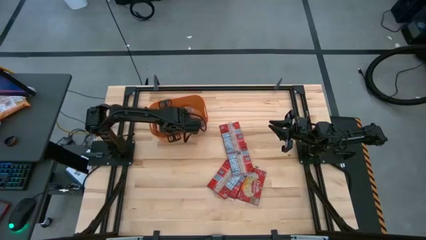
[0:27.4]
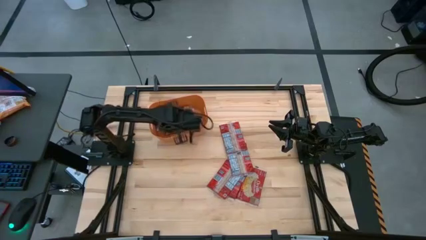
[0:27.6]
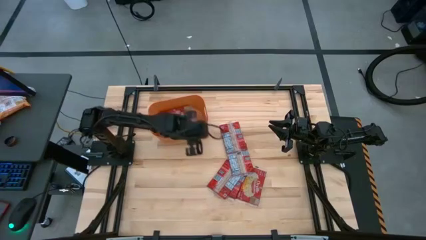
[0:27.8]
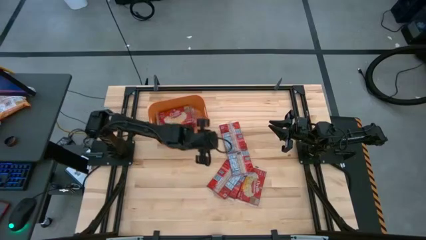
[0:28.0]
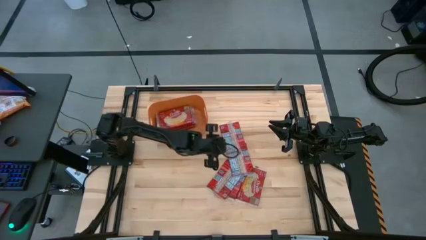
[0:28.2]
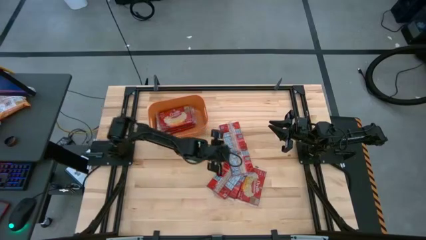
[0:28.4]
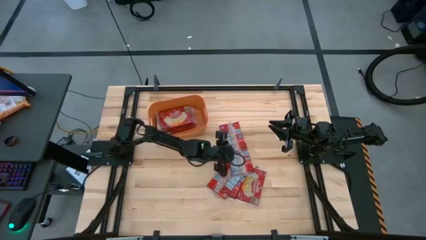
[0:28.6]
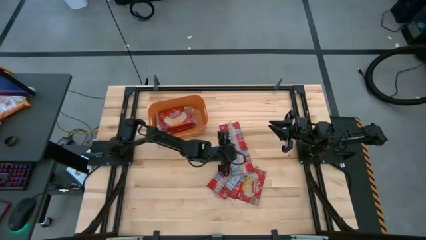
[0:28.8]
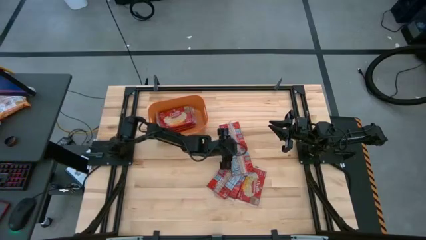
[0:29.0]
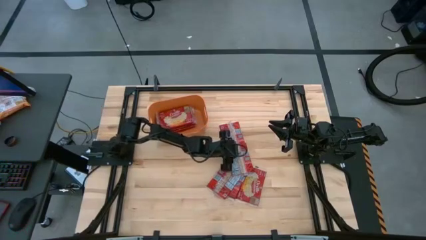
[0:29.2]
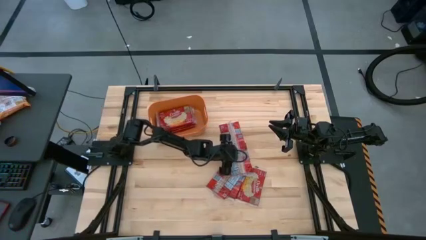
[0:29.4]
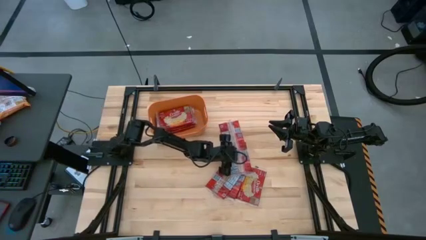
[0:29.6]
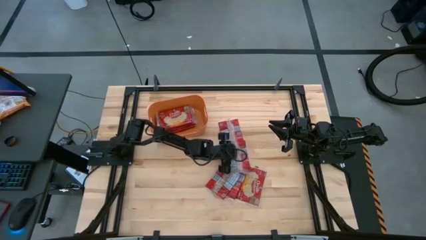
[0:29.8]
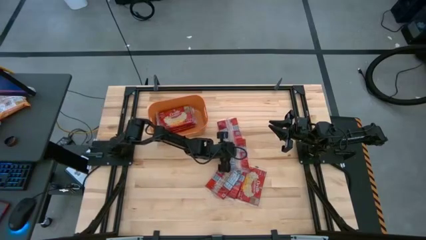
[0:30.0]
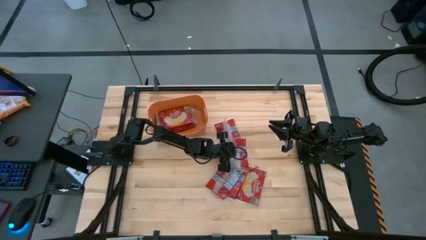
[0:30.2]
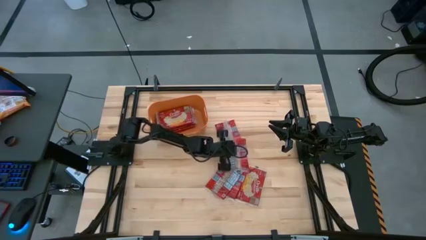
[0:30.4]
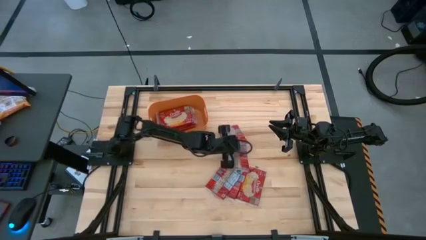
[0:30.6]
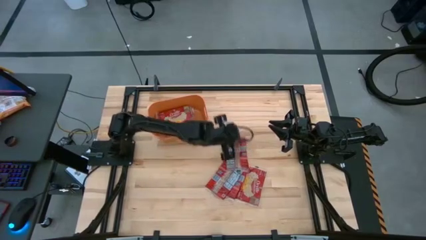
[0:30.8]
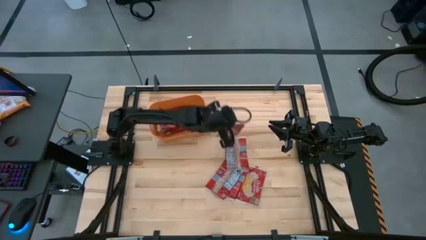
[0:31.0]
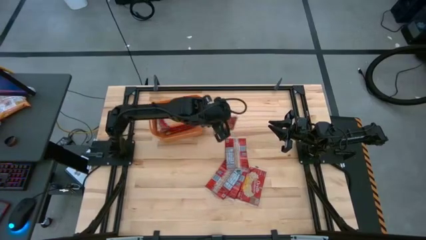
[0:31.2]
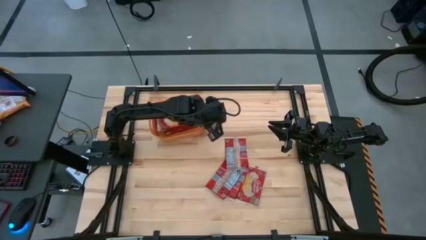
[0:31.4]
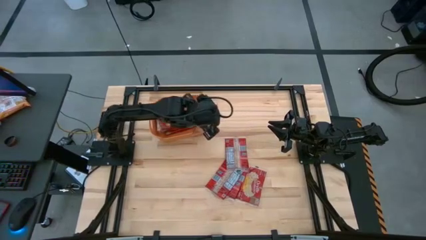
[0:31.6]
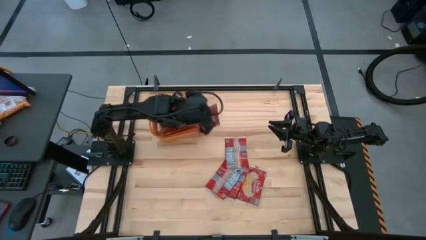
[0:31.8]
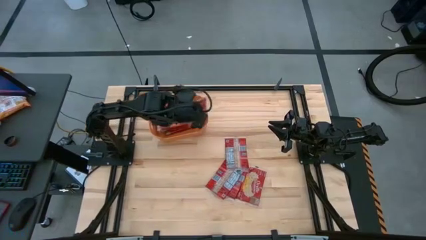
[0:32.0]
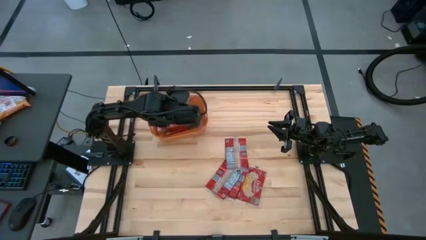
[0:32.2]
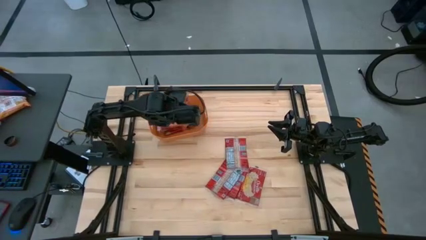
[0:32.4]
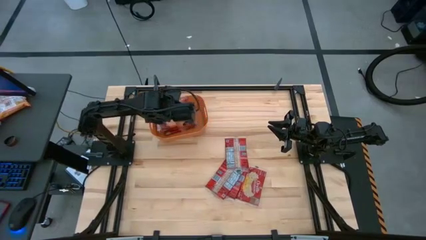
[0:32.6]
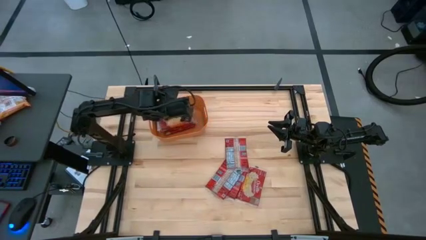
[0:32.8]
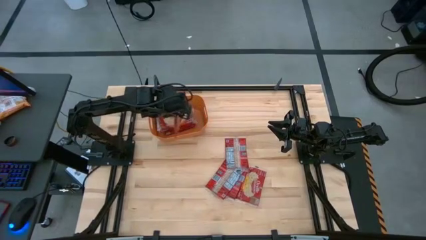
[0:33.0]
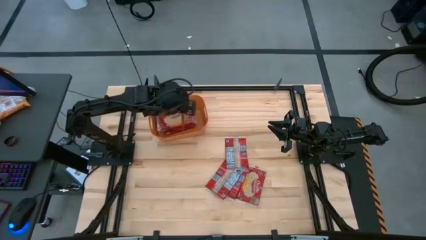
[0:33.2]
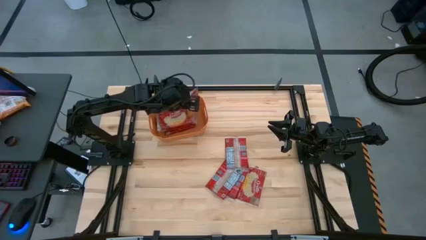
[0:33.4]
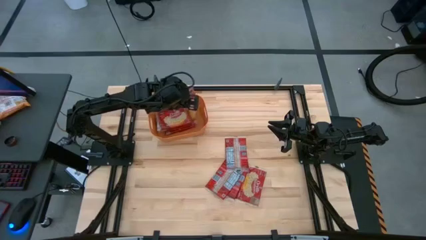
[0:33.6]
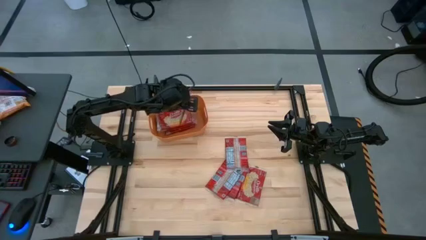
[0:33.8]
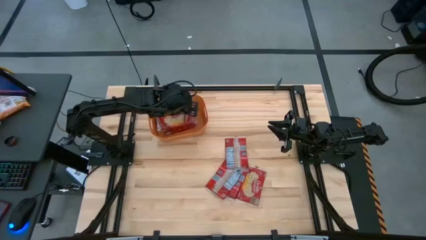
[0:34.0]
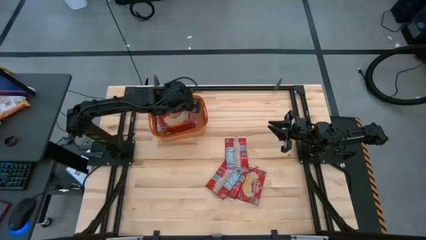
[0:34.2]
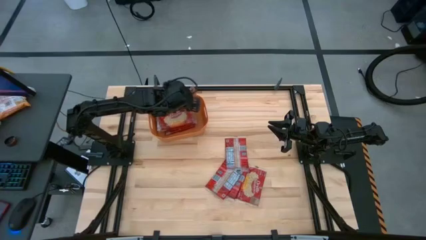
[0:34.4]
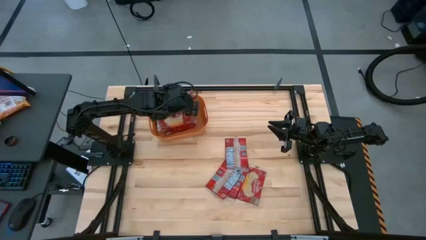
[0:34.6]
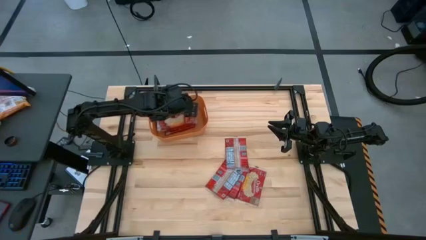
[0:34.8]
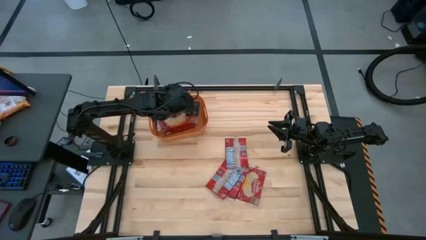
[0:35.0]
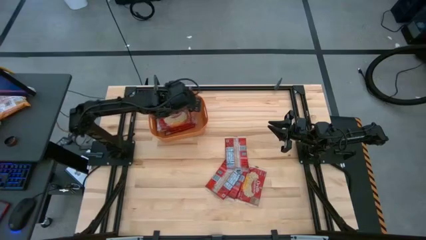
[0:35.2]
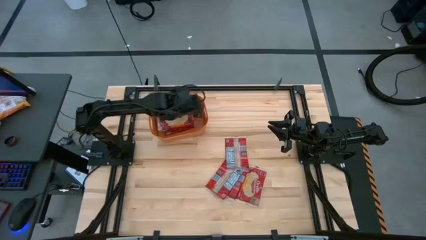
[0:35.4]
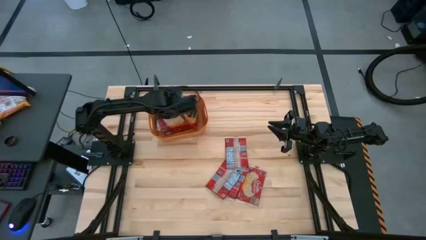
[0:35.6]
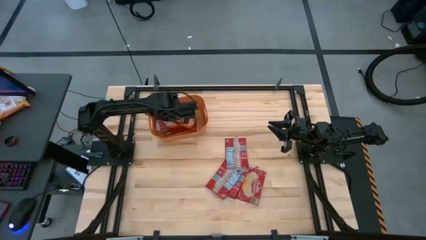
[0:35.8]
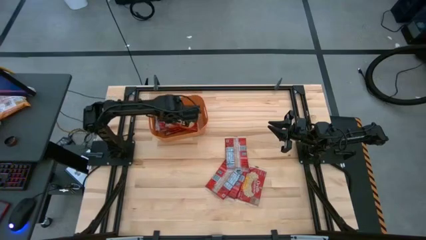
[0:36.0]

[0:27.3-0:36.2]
Task: Sort popcorn bags into baskets
Put the red popcorn bag into the orange container

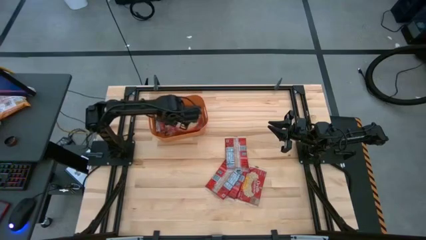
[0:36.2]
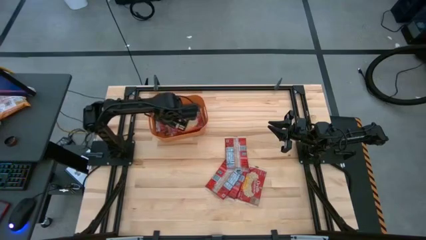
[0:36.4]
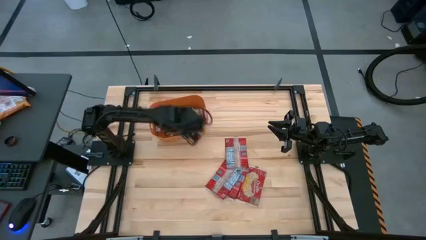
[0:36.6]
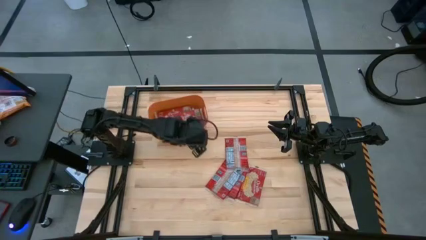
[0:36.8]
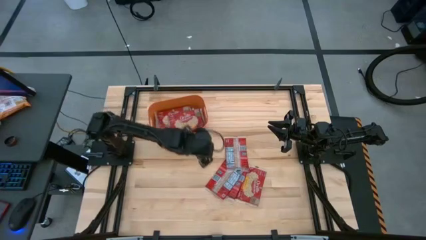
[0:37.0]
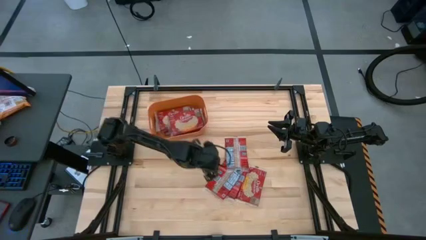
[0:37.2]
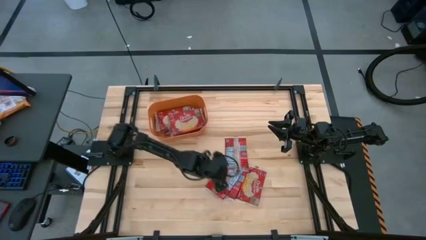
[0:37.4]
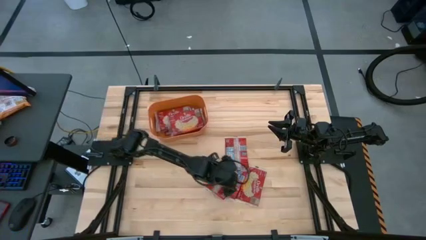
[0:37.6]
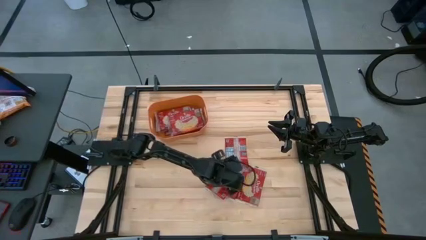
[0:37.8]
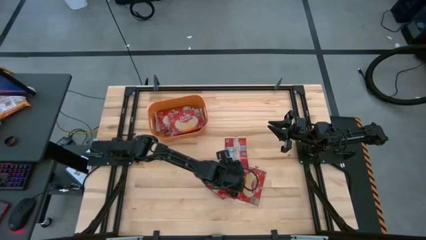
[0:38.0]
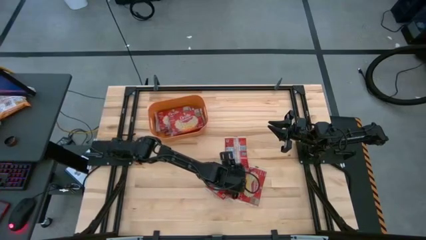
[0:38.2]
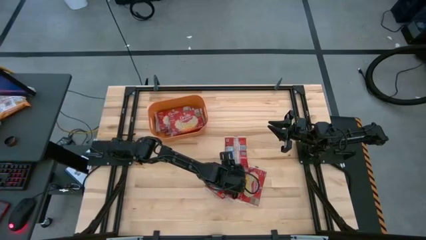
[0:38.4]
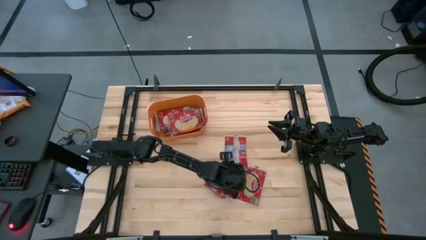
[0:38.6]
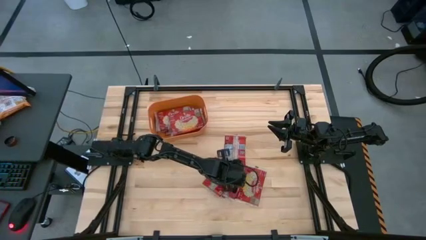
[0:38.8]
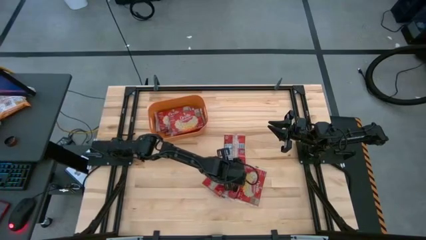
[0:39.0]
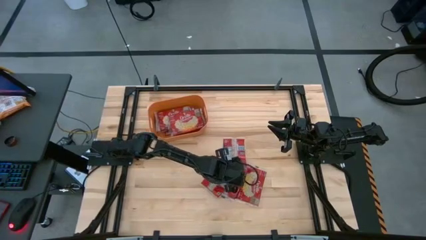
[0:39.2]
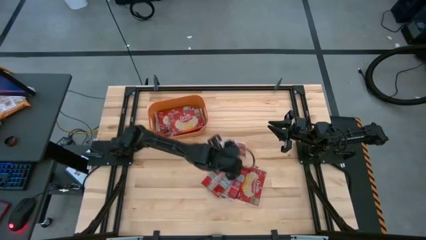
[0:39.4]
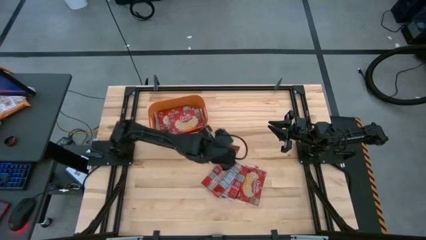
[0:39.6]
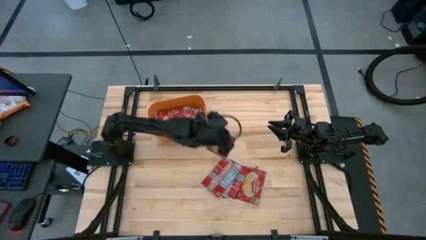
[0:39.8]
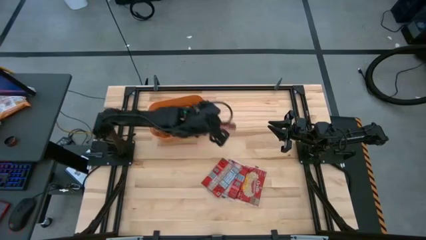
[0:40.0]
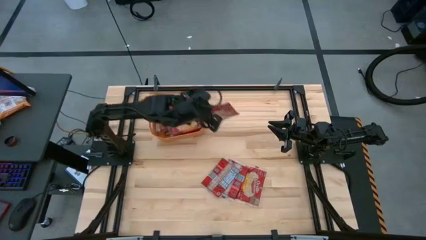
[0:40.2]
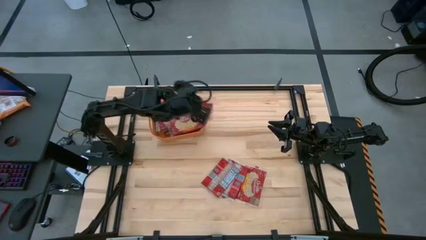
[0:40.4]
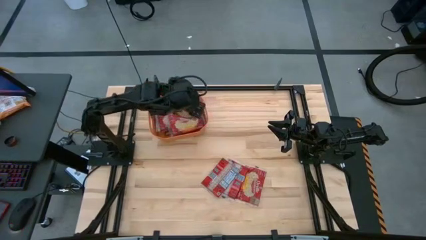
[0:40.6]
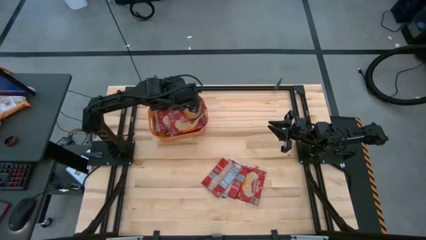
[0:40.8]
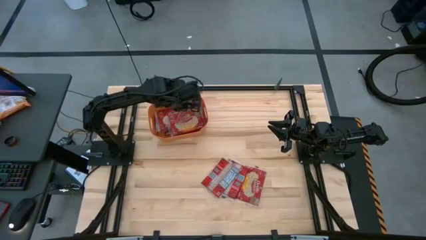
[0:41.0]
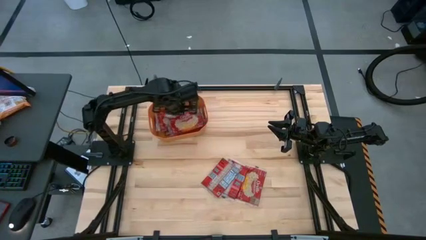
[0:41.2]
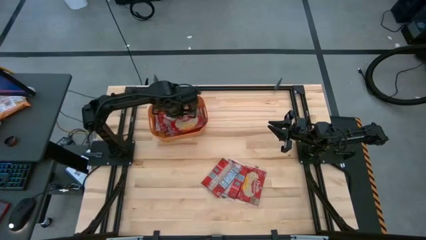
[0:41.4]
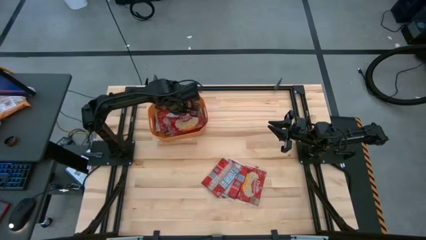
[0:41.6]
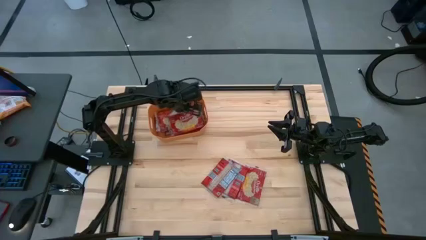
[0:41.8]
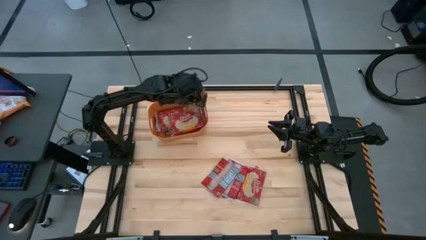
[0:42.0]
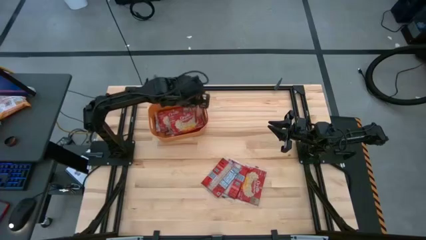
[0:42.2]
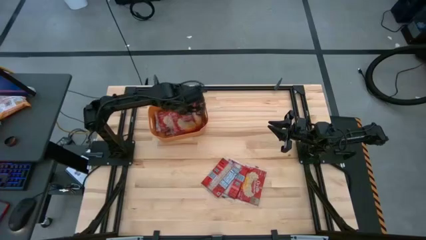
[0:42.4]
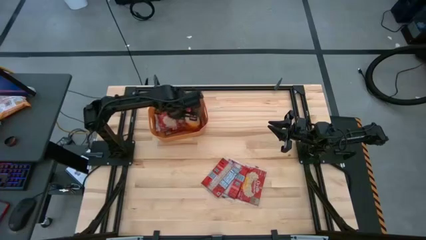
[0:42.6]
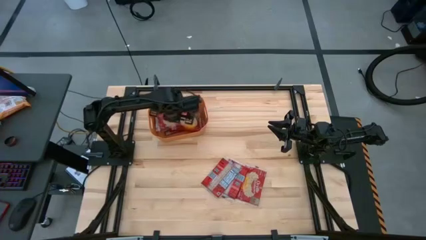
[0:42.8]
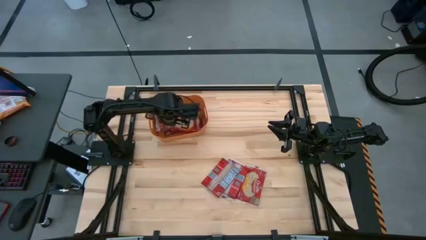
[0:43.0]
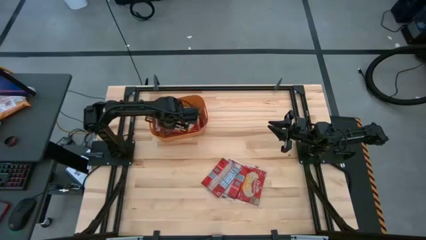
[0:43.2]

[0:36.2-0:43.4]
Put the red popcorn bag into the orange container
